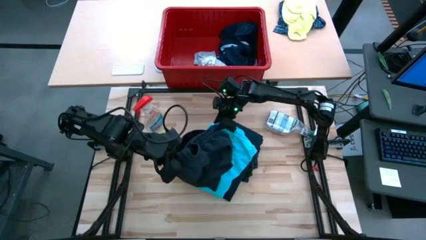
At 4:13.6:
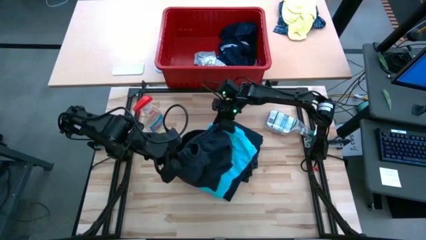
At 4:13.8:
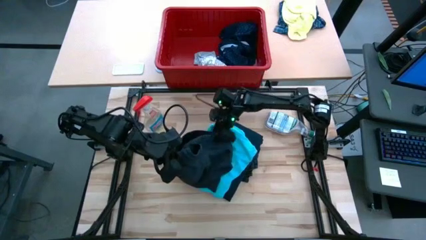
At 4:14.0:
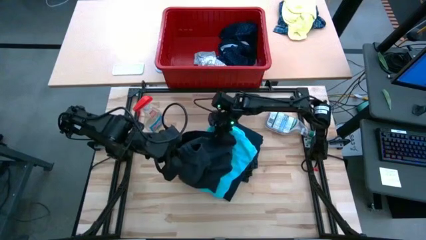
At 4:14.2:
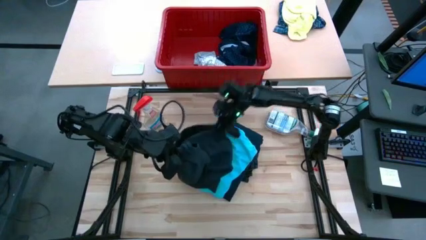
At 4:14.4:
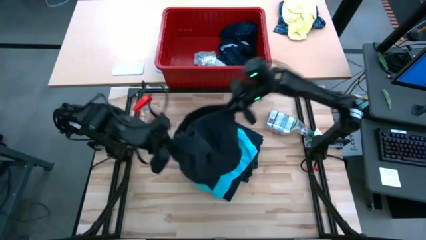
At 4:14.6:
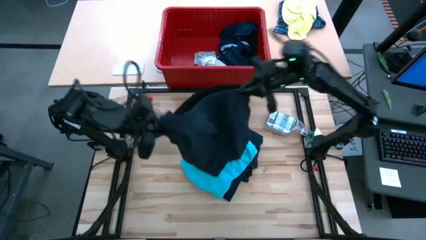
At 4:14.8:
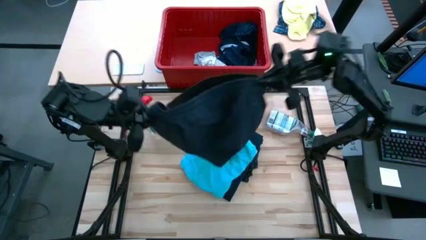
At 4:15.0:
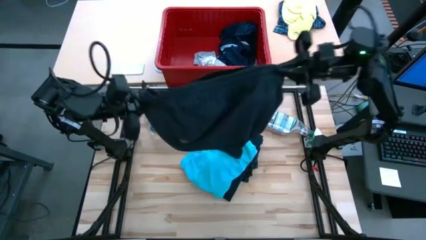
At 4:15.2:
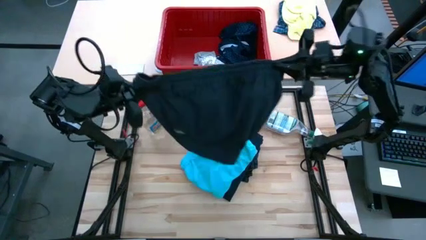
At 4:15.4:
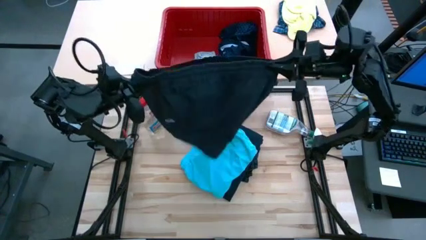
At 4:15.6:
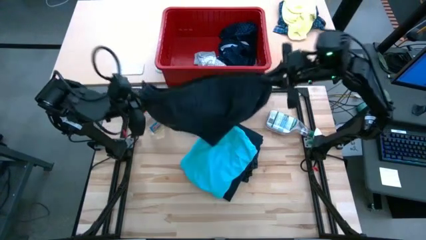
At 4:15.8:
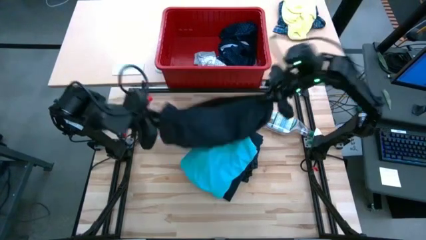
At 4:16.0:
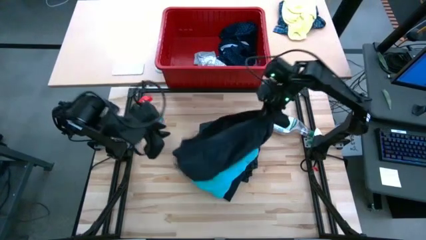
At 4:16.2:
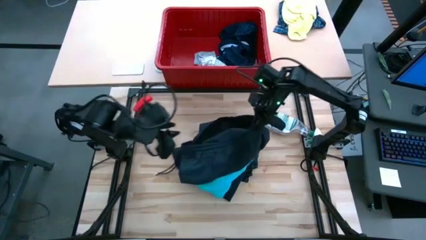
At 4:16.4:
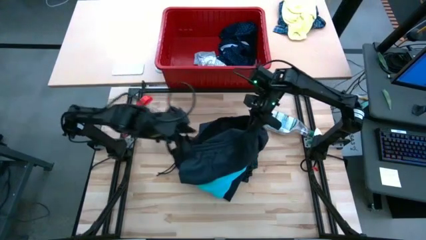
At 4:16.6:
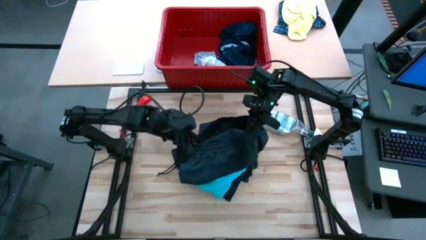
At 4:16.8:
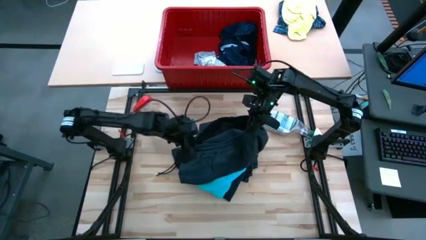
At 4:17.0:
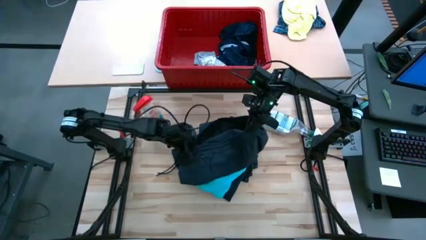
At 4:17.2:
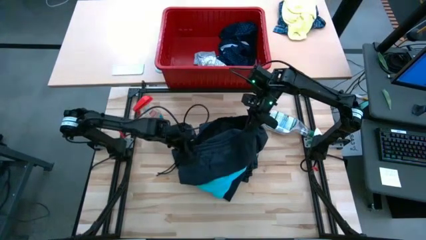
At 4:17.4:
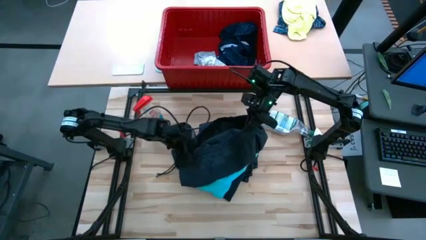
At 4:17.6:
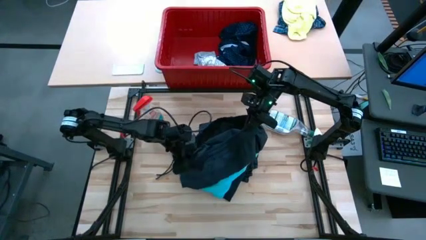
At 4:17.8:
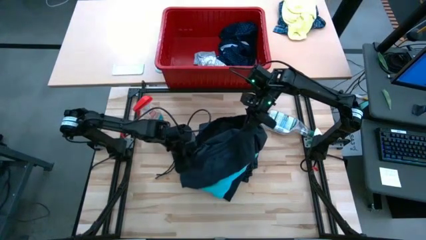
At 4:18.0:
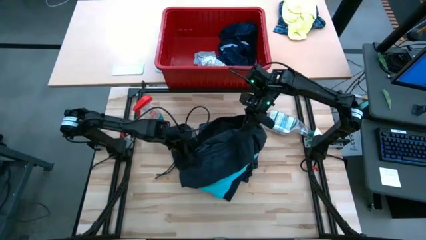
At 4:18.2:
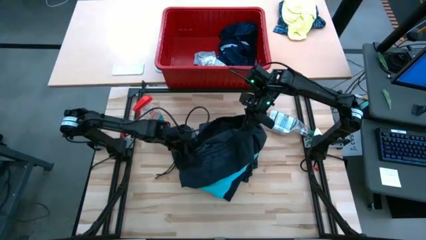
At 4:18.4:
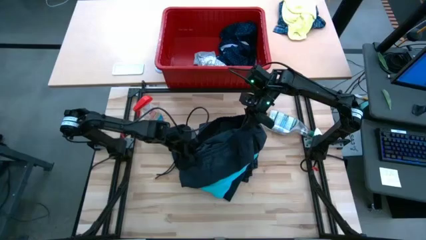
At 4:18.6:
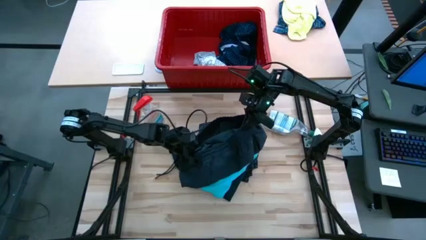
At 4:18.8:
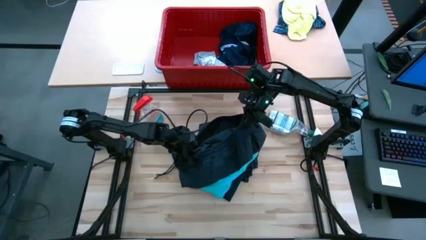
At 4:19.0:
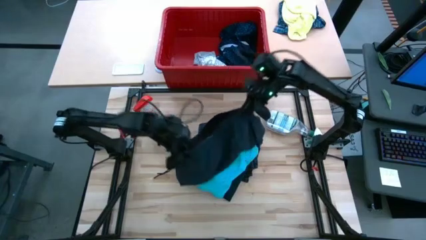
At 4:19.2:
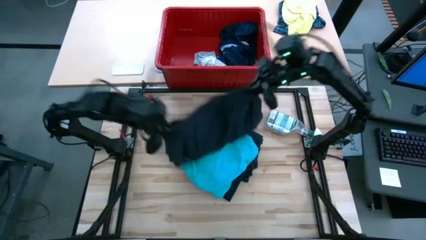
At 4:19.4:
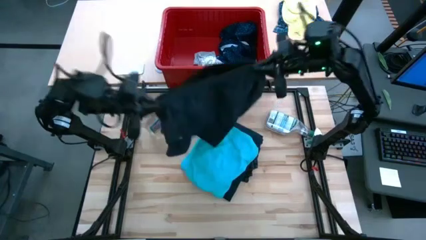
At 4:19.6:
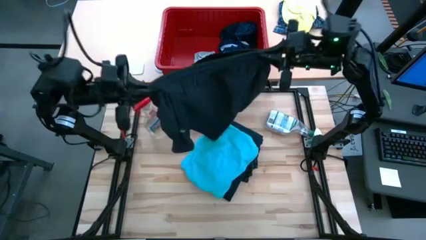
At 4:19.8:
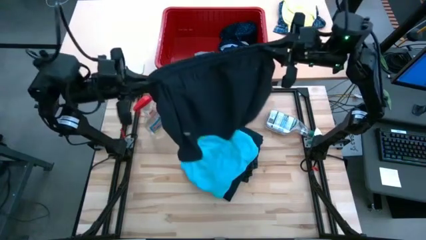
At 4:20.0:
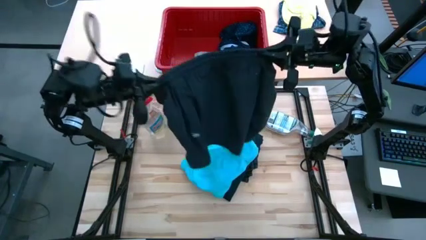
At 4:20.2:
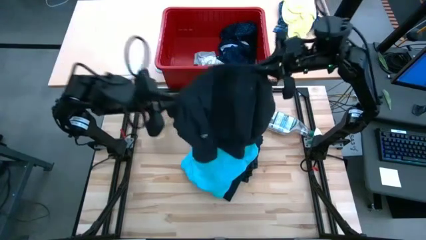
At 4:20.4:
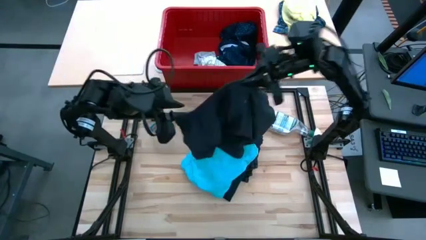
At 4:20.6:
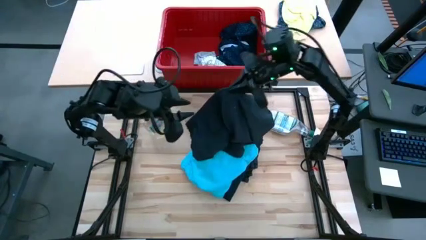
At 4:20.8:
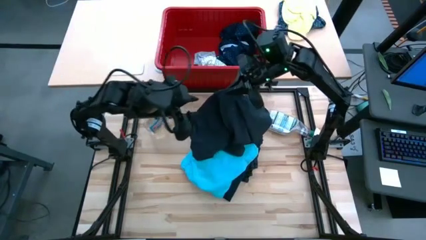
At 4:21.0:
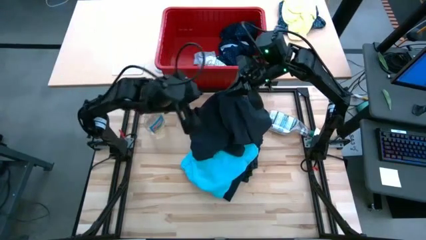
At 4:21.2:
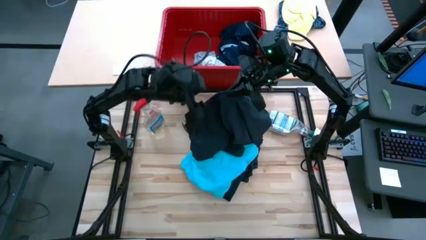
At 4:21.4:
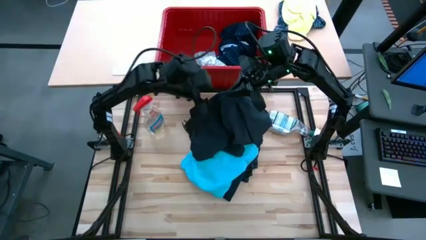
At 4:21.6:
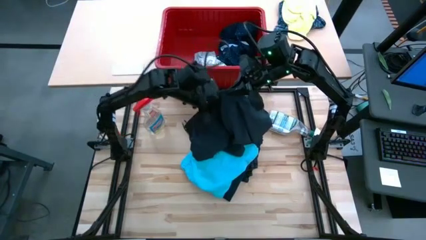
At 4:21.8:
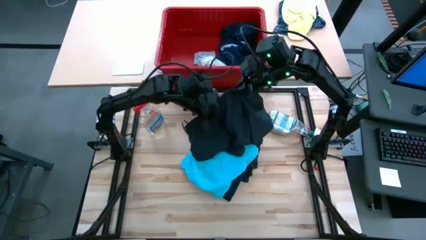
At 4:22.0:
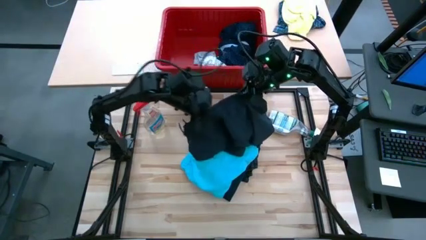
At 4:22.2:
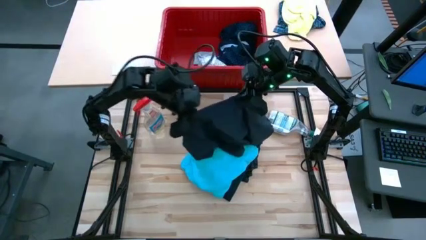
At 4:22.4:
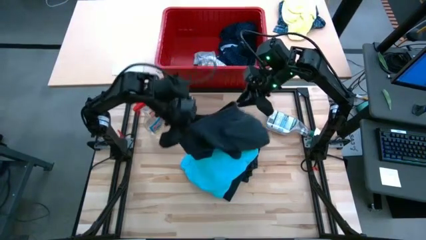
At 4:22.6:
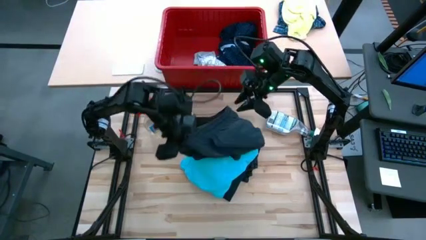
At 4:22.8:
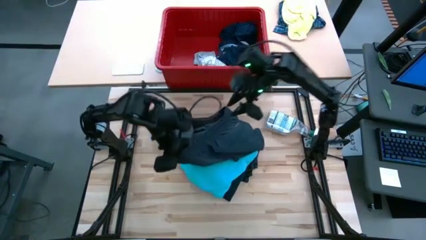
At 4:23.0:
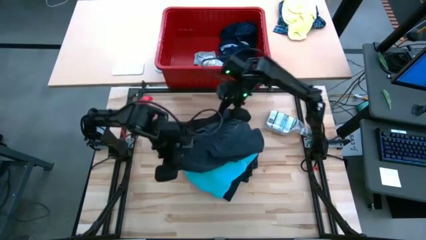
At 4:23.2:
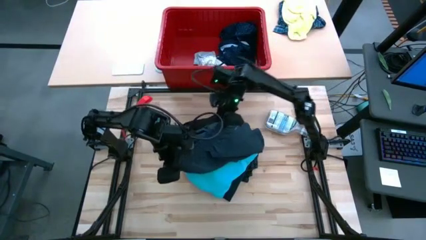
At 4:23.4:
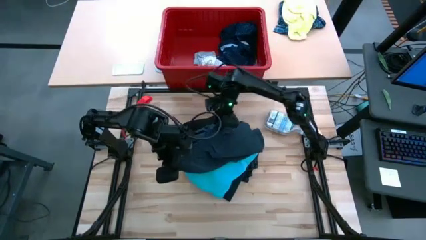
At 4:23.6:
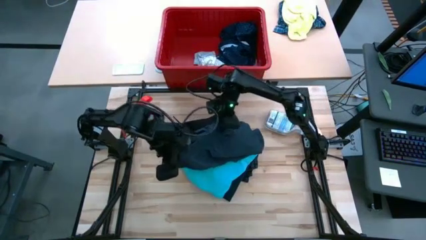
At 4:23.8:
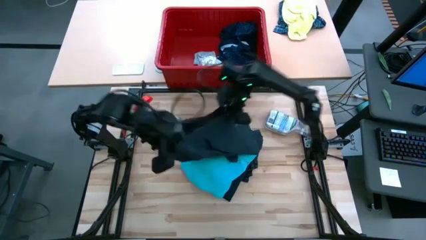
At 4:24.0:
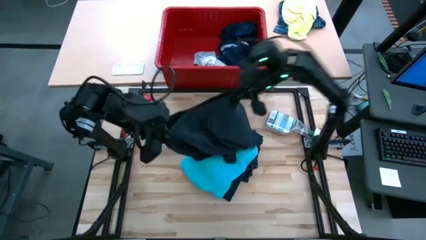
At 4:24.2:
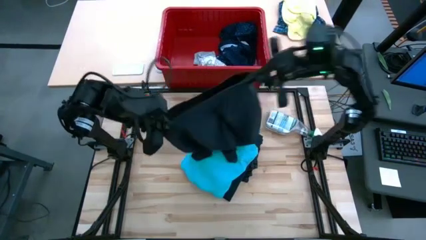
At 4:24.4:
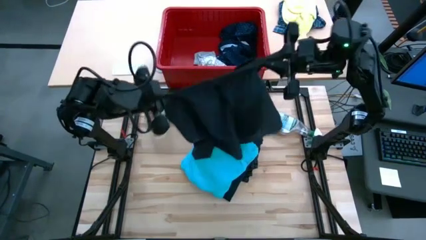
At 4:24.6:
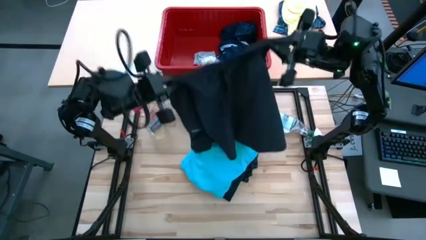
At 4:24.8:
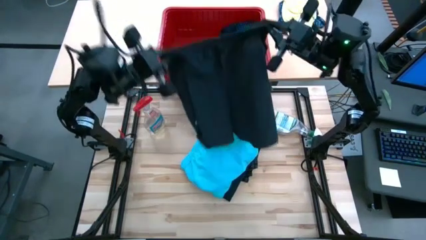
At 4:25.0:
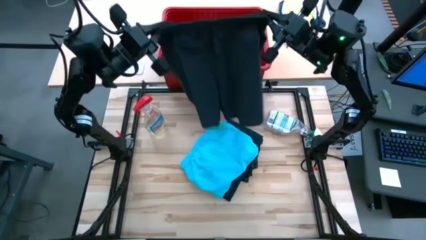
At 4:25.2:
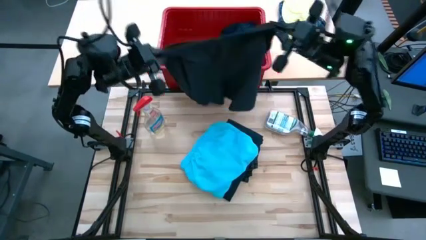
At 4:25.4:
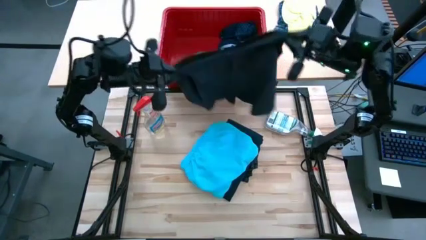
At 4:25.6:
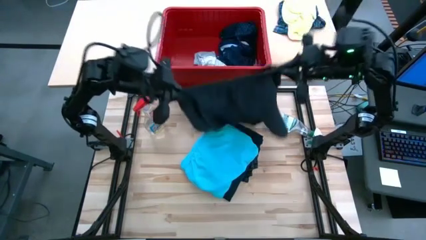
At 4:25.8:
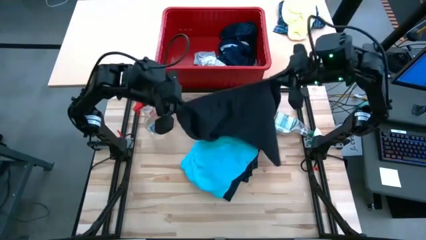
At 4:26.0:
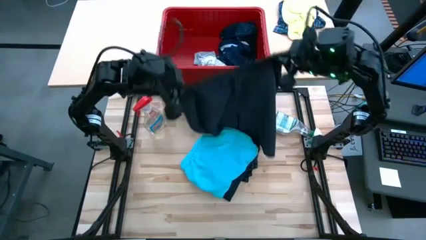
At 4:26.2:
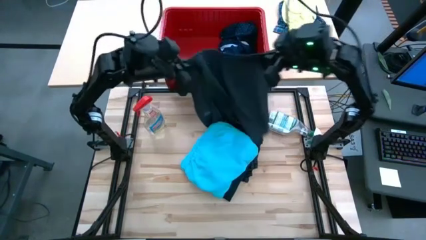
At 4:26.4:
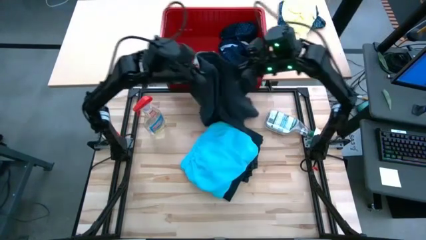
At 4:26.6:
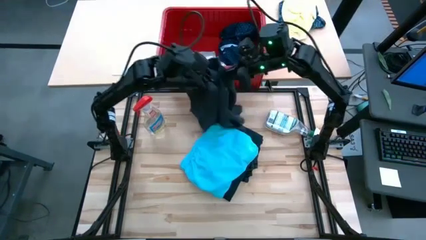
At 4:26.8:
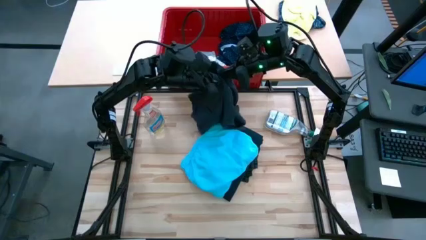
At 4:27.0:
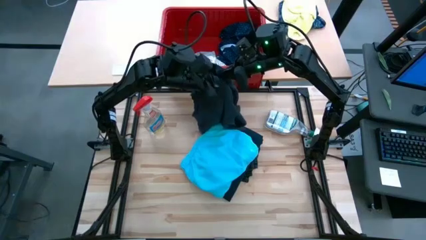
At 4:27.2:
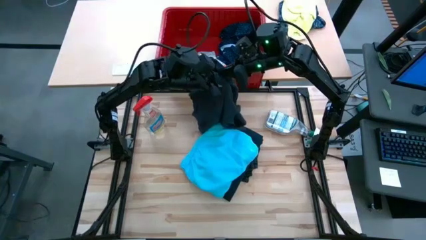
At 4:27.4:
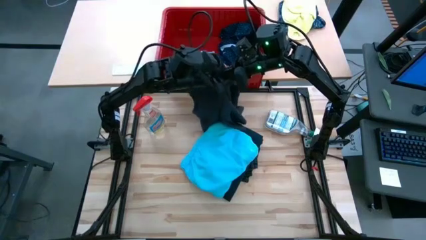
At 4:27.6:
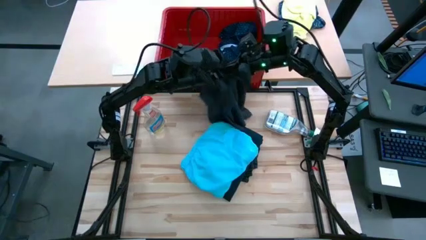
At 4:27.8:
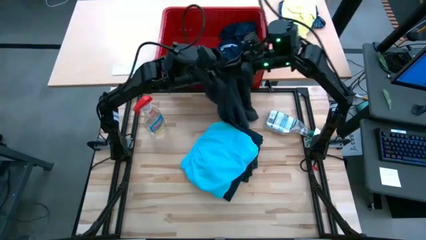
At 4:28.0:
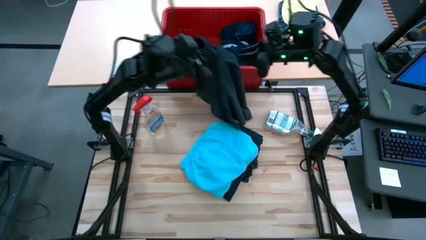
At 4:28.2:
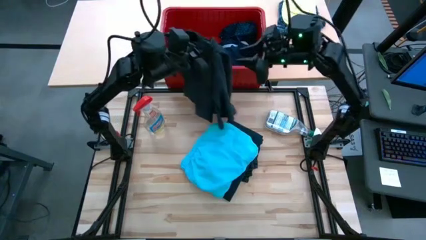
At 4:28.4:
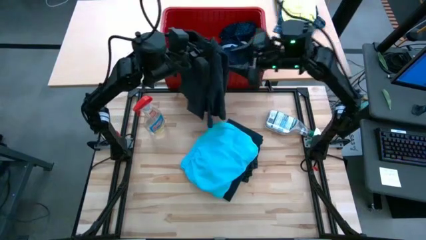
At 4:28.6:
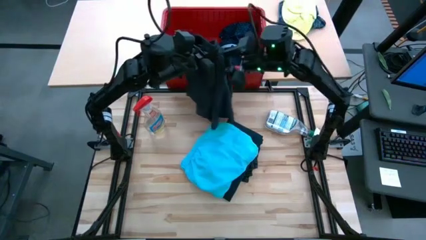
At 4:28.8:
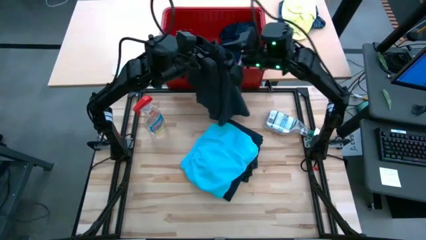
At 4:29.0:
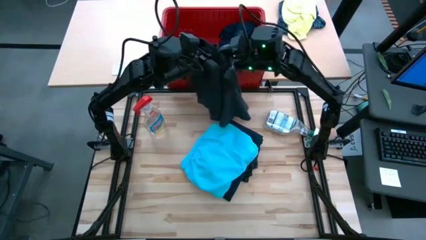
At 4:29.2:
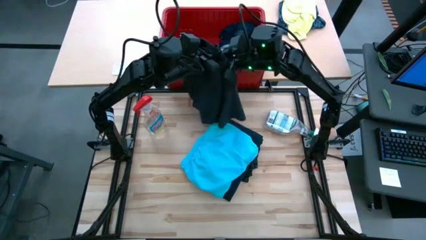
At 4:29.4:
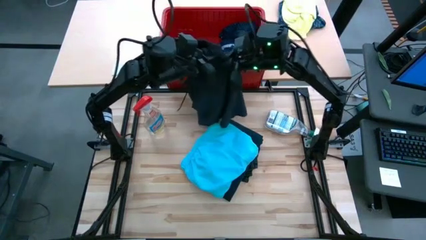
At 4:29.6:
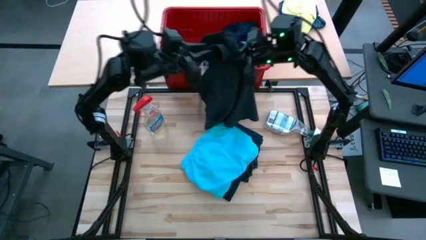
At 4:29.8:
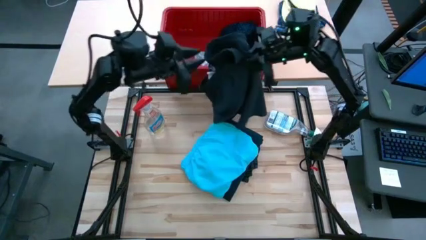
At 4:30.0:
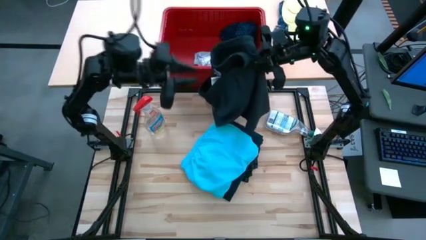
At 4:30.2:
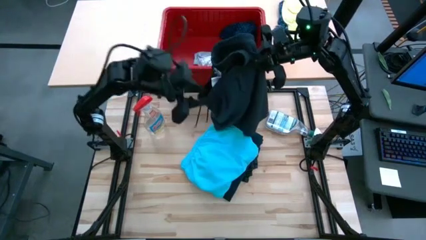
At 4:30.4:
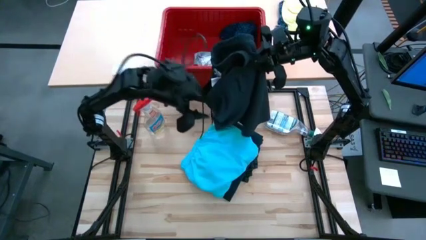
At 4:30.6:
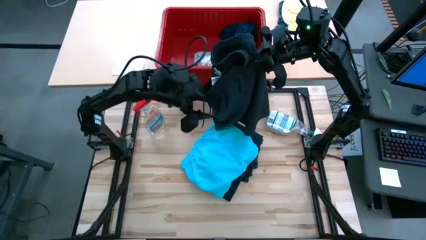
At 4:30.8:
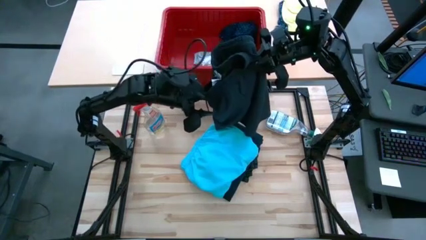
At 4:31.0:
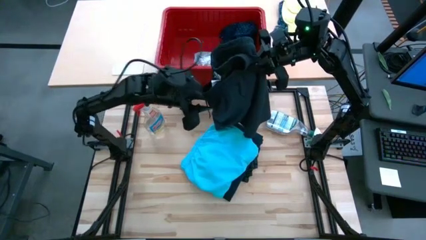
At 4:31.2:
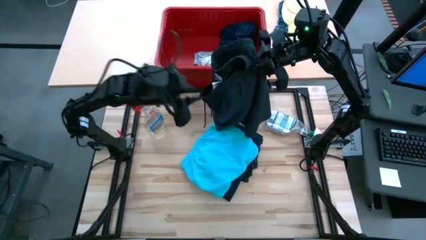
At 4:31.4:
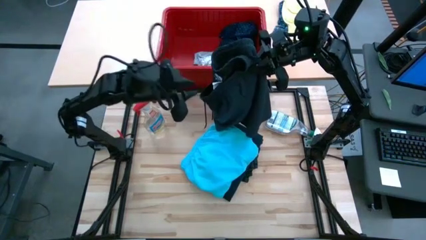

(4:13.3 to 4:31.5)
Task: Fold Laundry from Bin
Fold the black shorts
